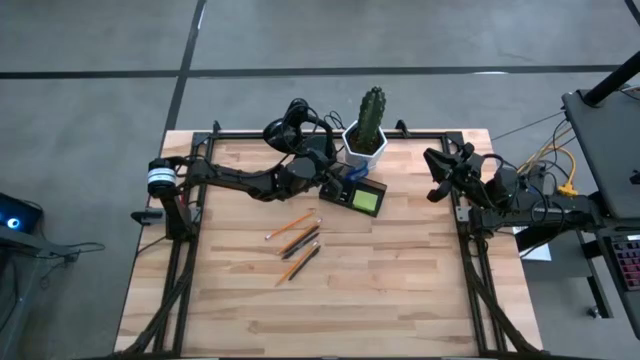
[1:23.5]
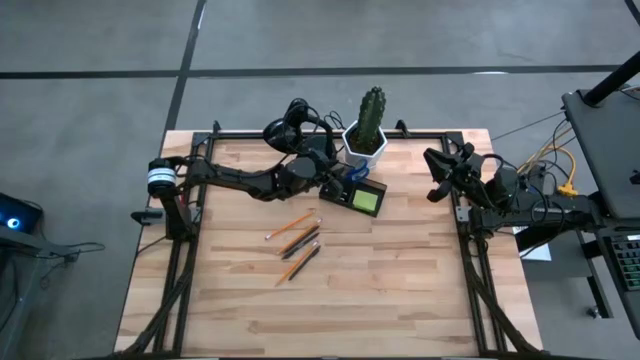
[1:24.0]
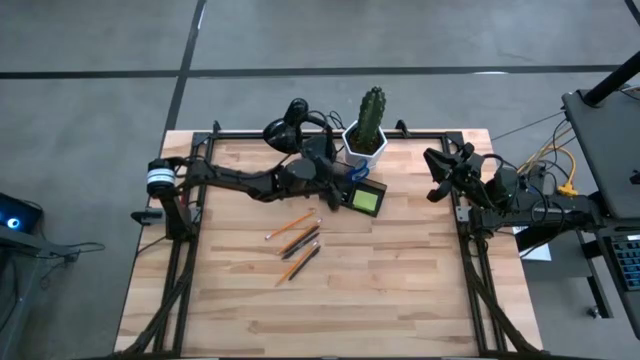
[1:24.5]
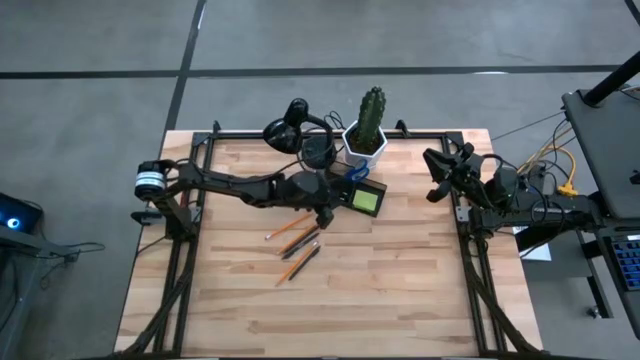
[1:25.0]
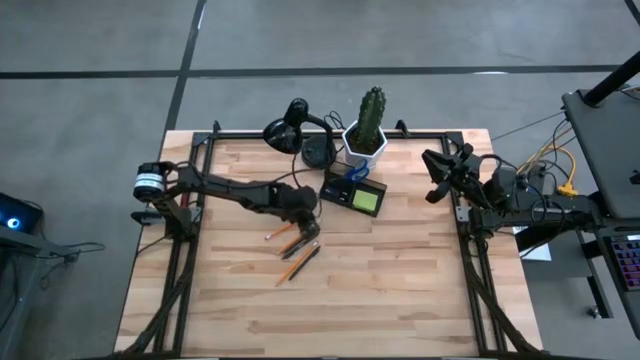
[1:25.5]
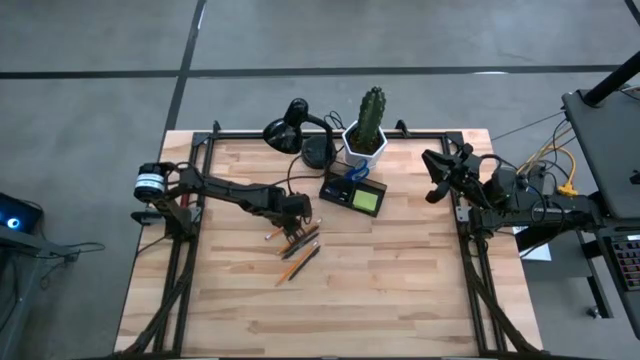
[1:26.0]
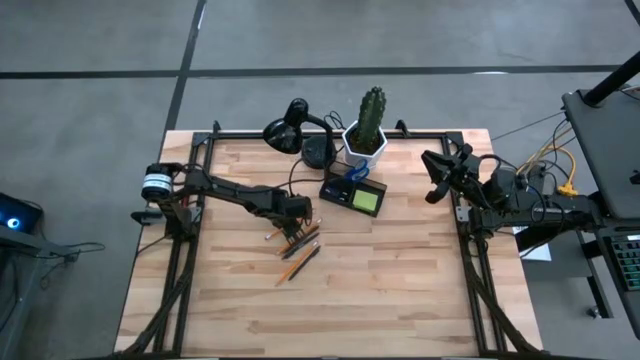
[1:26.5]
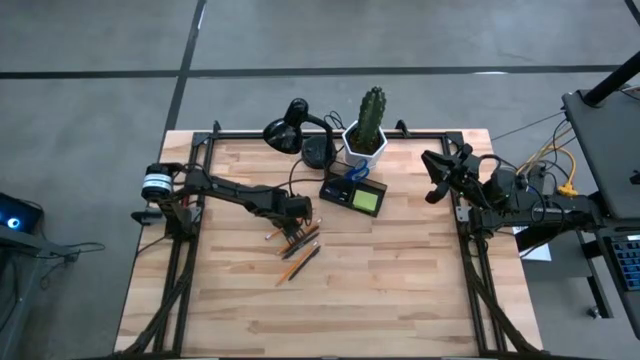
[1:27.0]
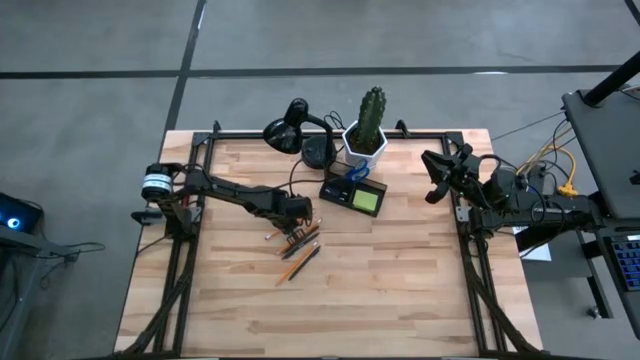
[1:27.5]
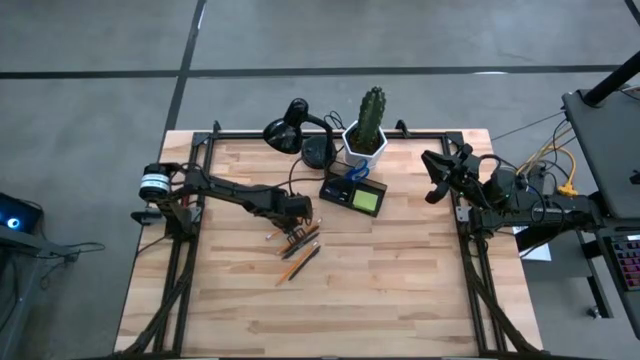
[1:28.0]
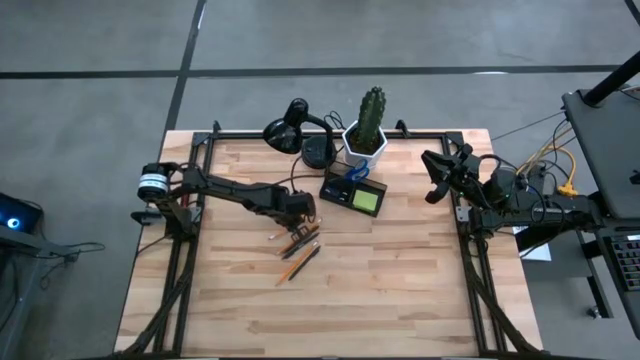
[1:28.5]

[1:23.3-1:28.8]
Task: Pick and place office supplies into organizer
Put the top orange pencil into the black desk organizer

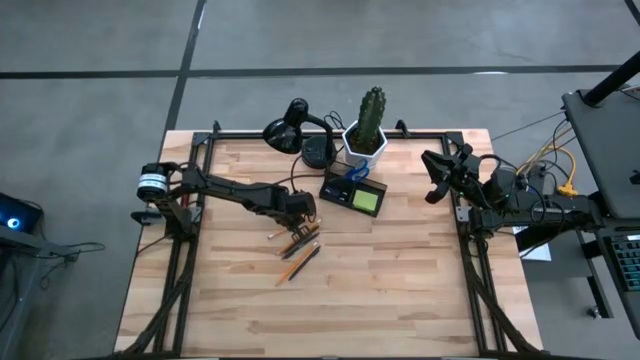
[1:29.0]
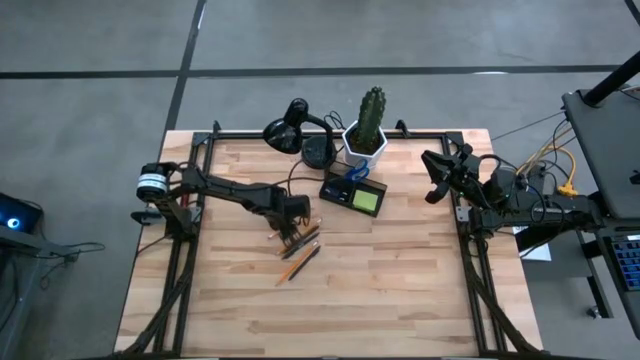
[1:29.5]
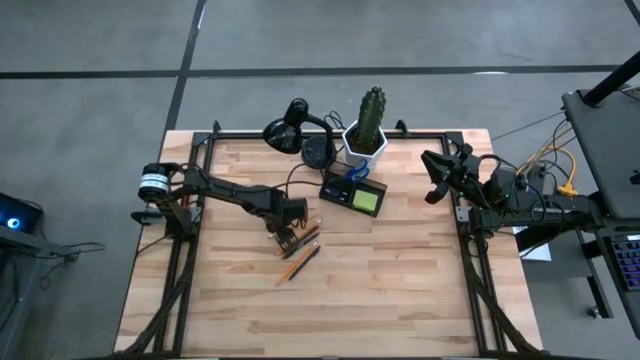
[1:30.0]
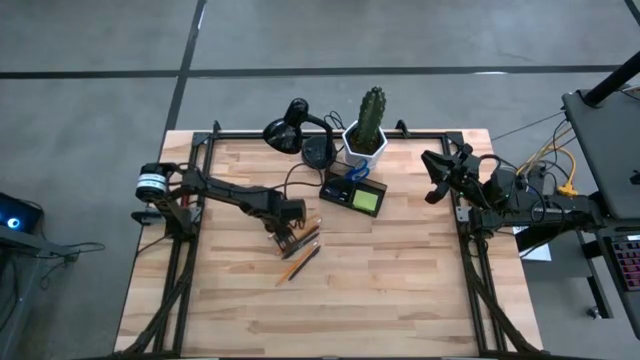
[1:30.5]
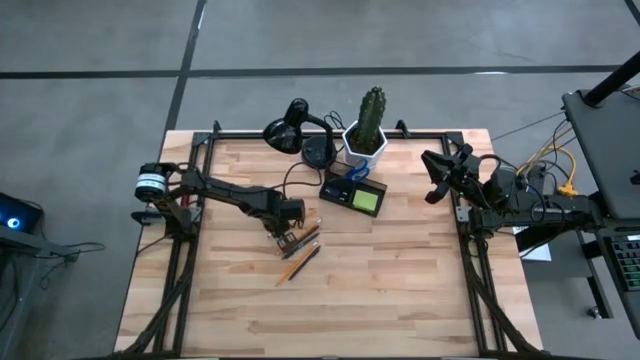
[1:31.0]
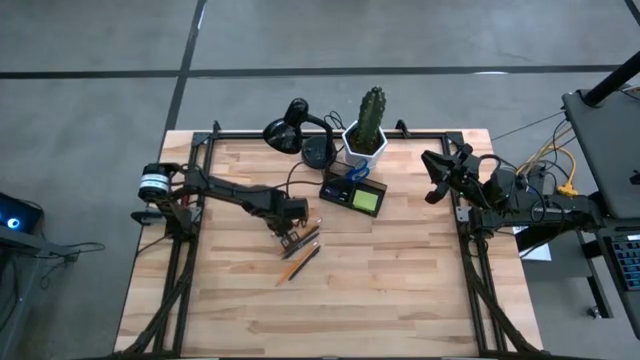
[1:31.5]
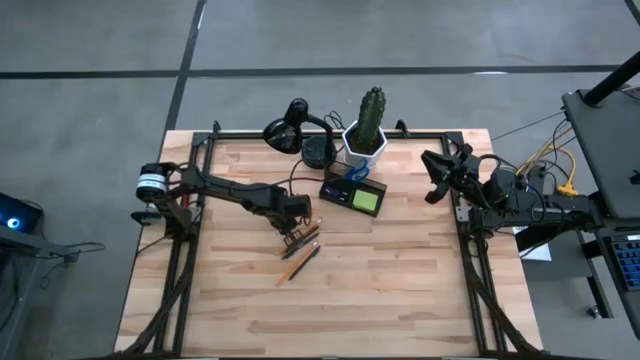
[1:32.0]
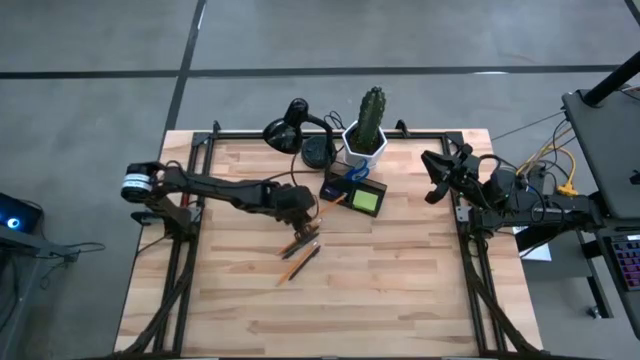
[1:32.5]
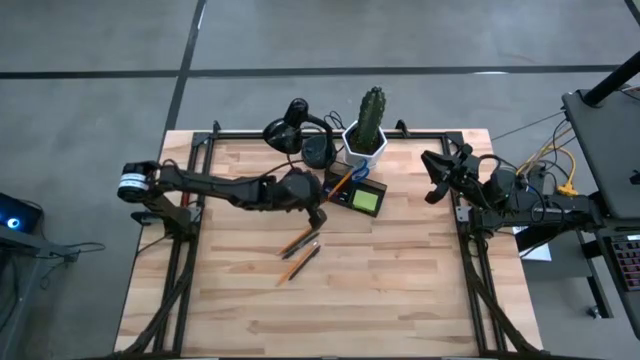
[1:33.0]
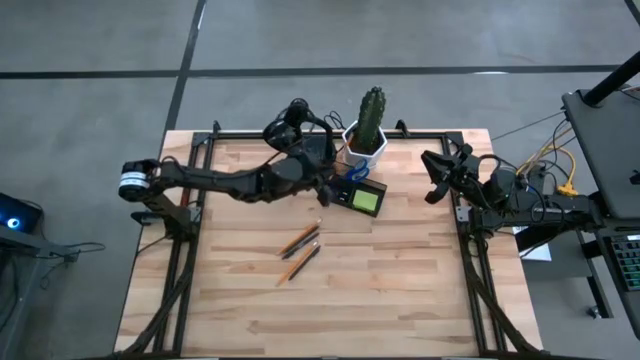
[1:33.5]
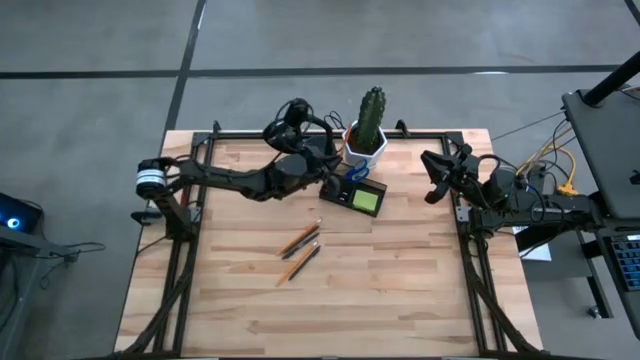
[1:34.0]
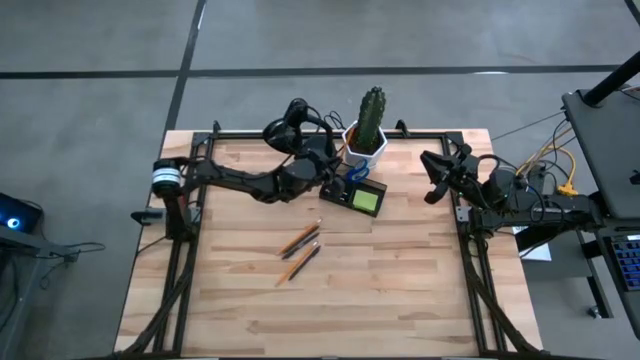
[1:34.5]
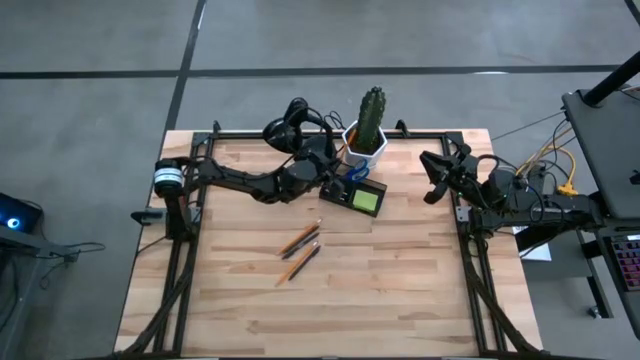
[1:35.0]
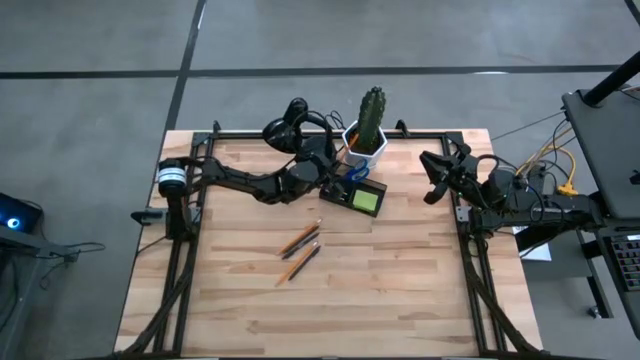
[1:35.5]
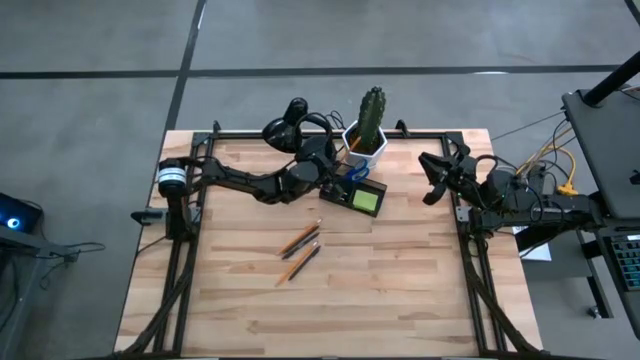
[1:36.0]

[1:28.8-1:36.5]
Put the top orange pencil into the black desk organizer

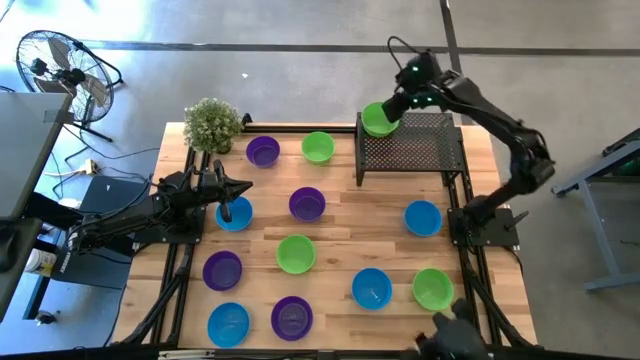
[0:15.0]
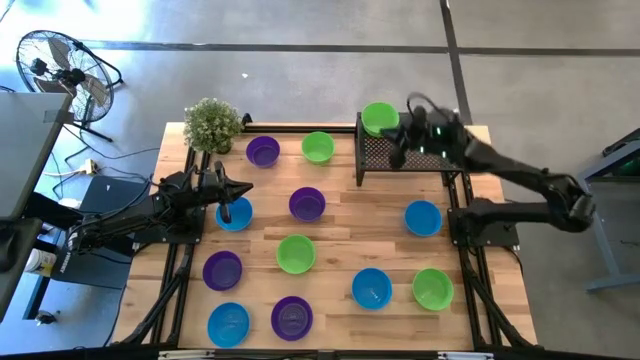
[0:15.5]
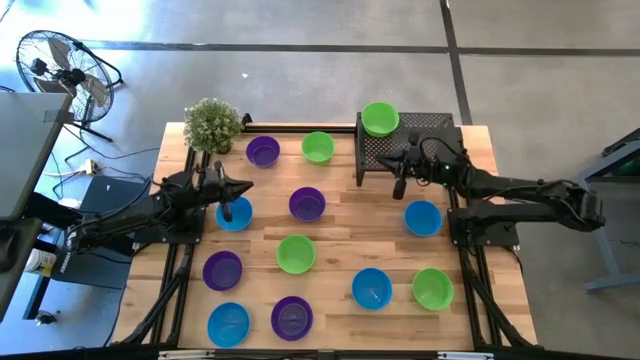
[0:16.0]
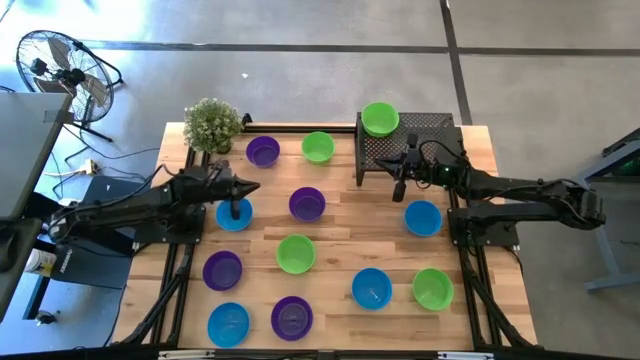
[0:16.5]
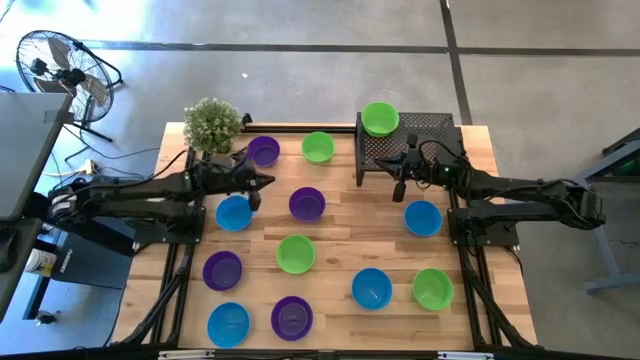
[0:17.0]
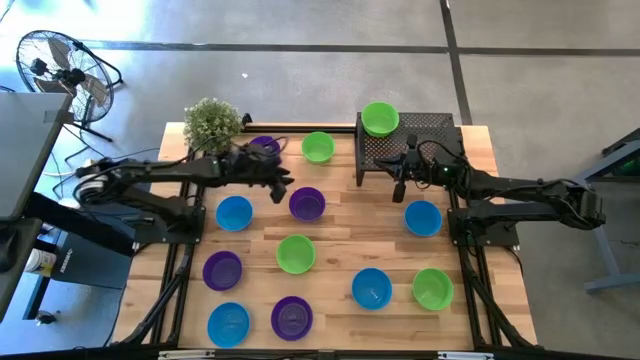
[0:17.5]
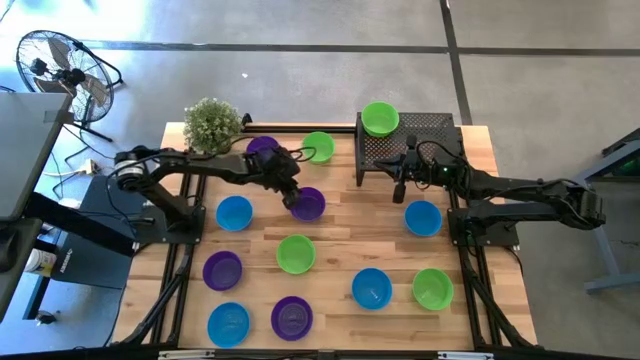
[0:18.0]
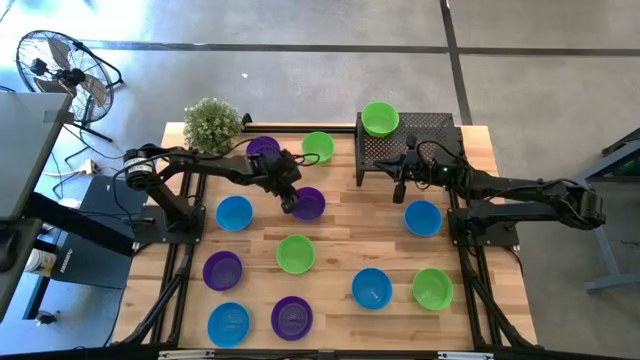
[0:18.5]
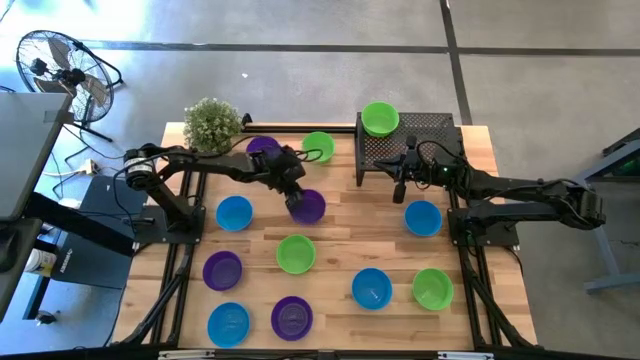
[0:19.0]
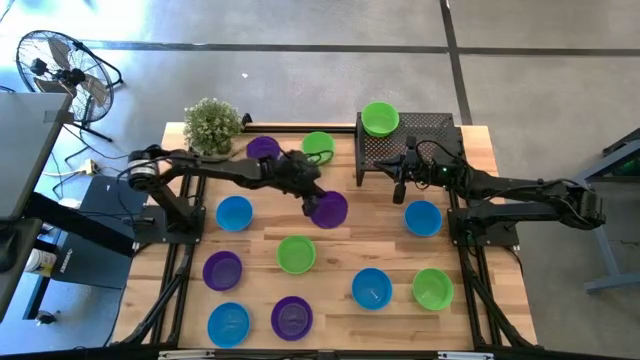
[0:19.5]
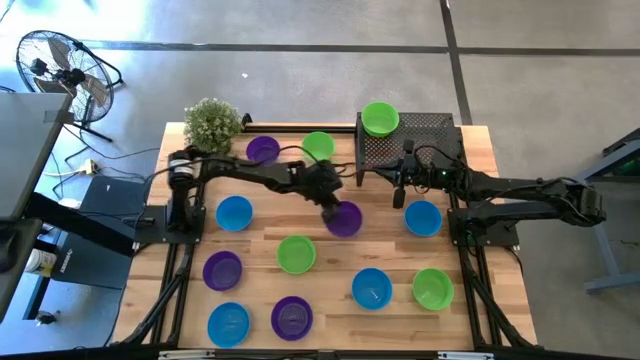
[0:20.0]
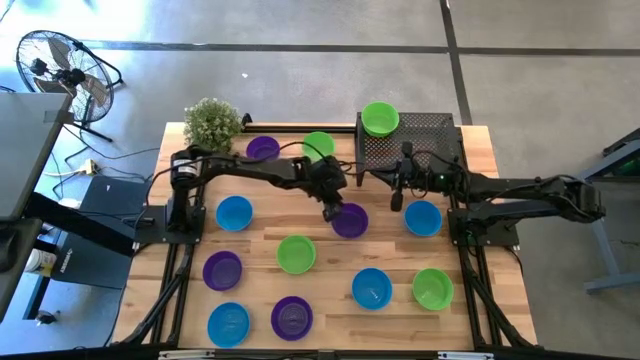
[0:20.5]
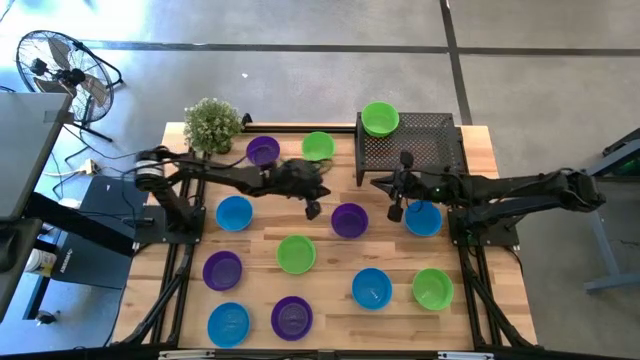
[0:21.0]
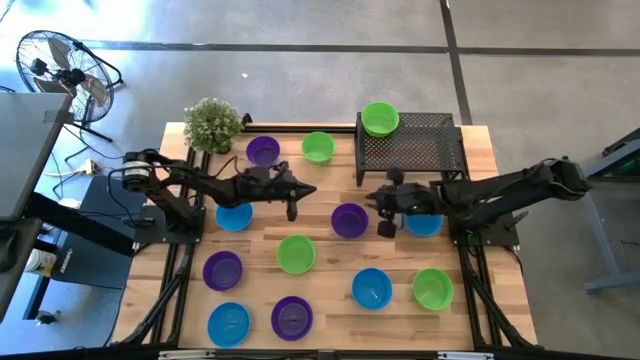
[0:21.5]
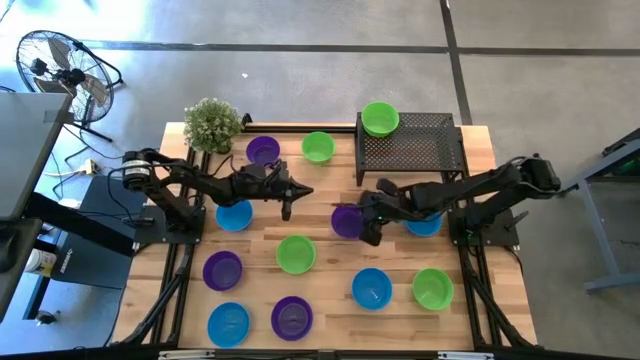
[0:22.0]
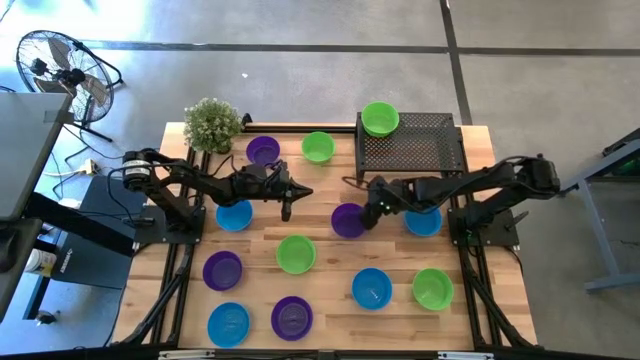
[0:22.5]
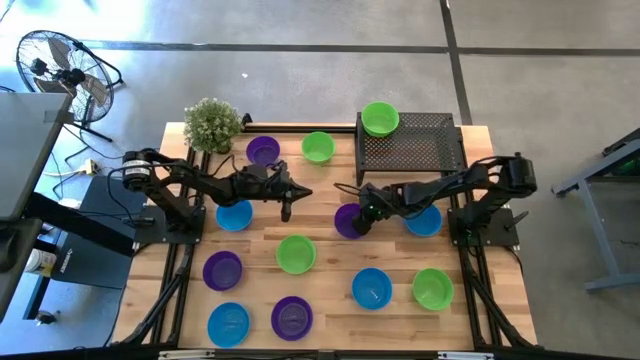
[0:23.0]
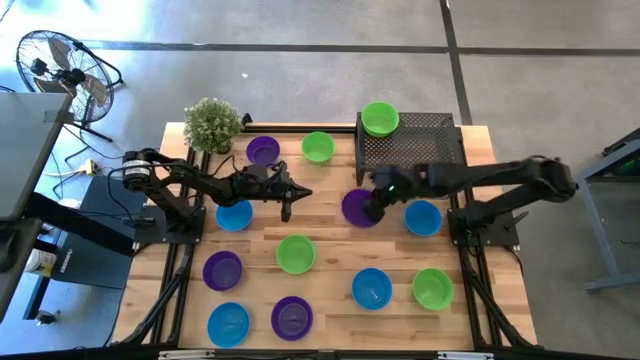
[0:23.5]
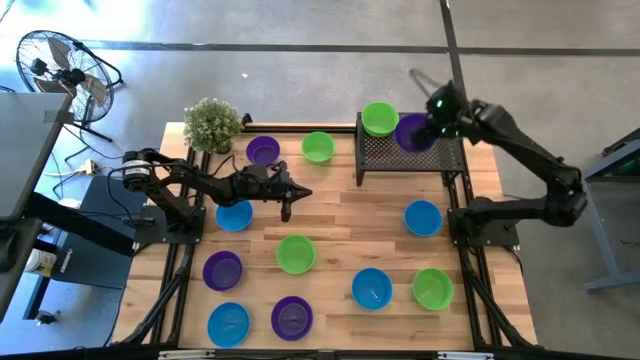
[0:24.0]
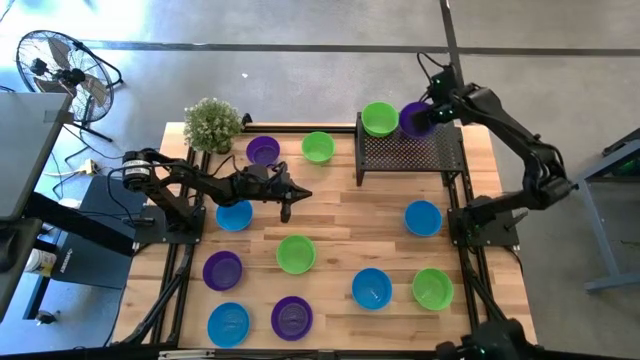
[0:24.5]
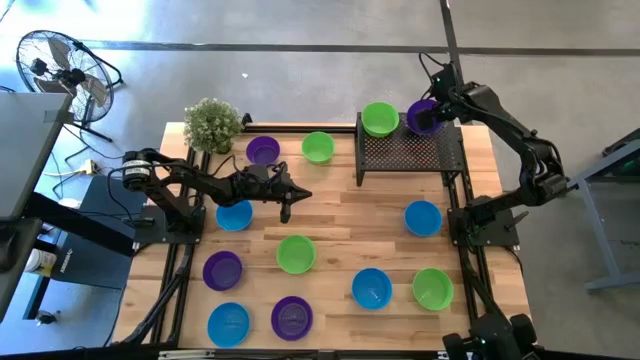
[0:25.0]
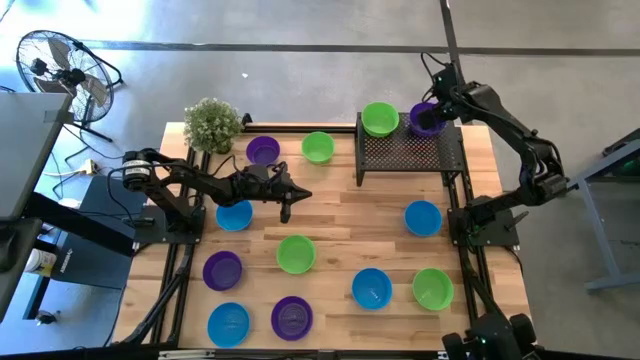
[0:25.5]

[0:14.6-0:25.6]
Task: Pick & Place Mini bowls
Put the purple bowl on the shelf
